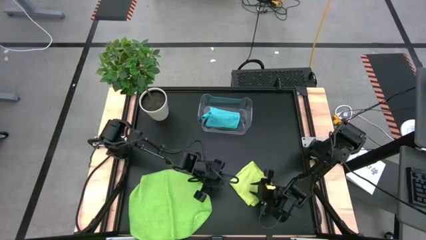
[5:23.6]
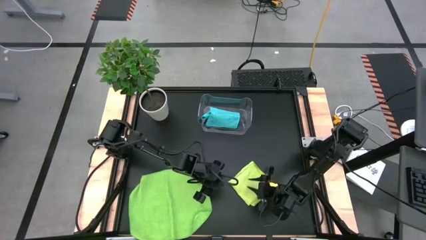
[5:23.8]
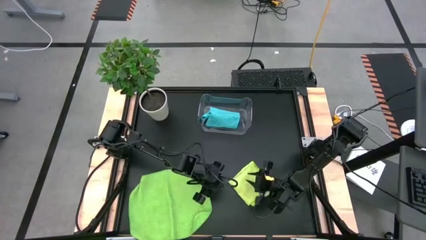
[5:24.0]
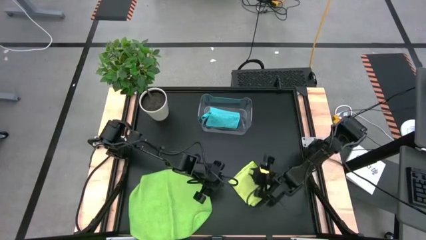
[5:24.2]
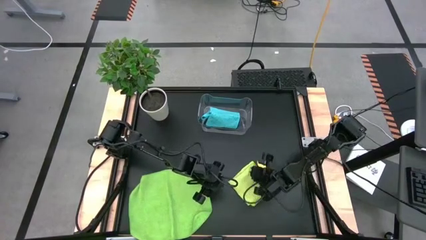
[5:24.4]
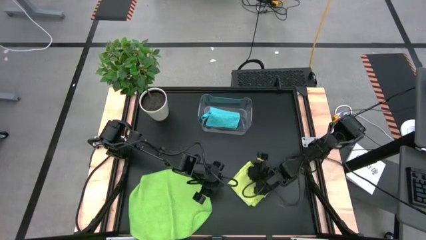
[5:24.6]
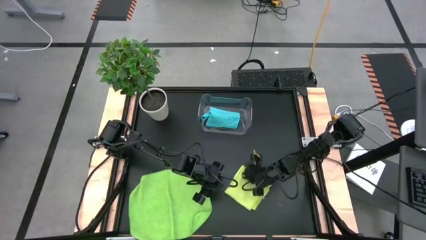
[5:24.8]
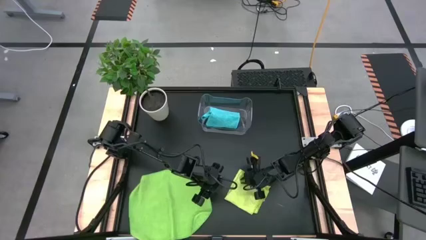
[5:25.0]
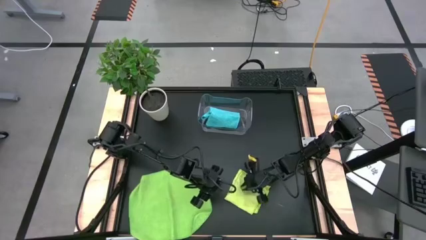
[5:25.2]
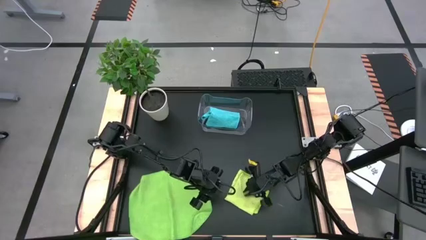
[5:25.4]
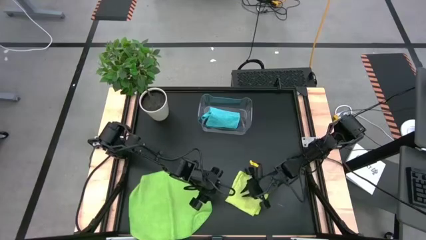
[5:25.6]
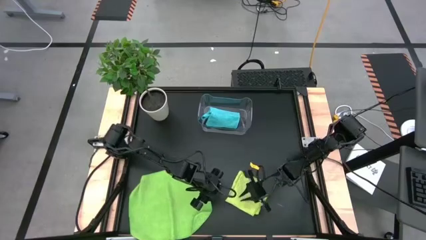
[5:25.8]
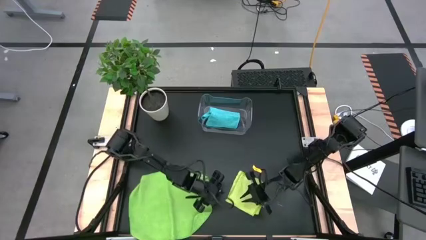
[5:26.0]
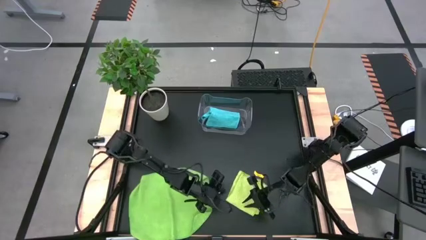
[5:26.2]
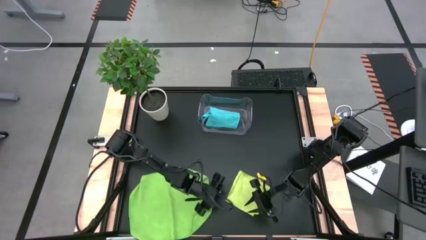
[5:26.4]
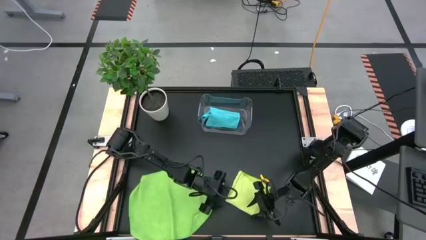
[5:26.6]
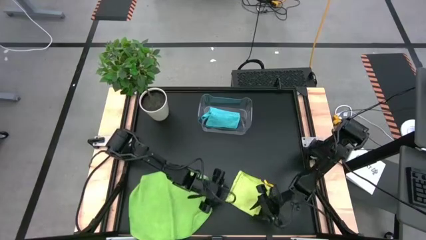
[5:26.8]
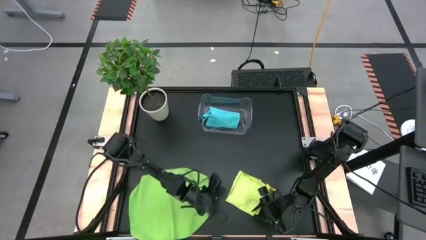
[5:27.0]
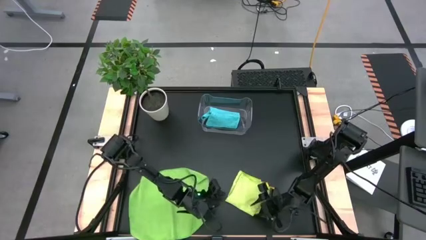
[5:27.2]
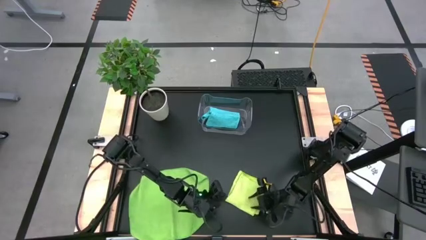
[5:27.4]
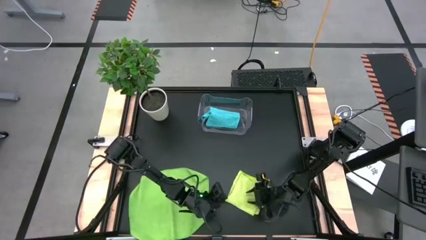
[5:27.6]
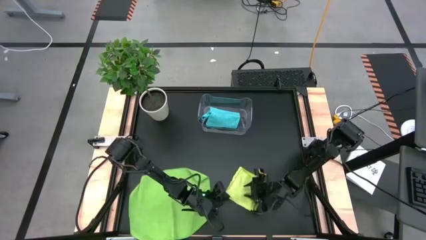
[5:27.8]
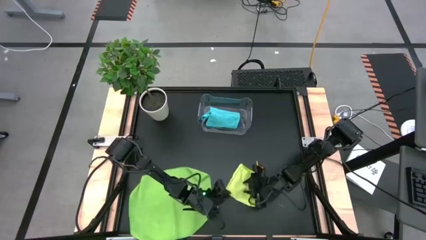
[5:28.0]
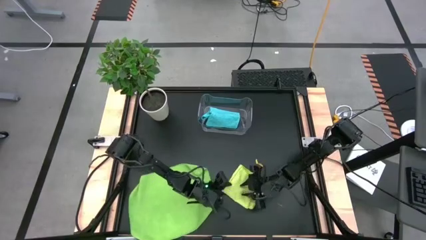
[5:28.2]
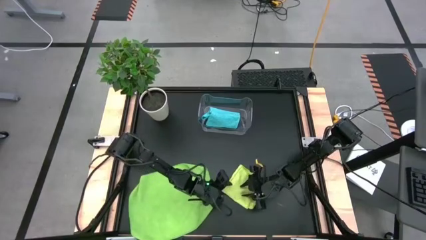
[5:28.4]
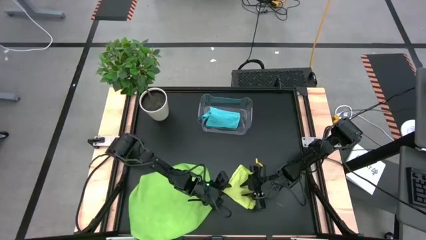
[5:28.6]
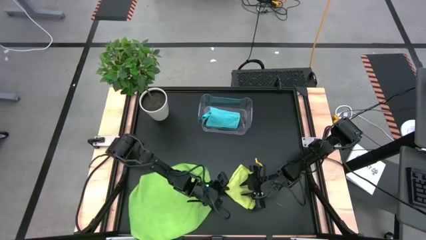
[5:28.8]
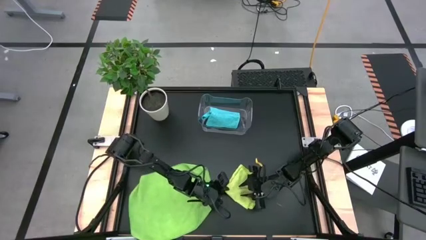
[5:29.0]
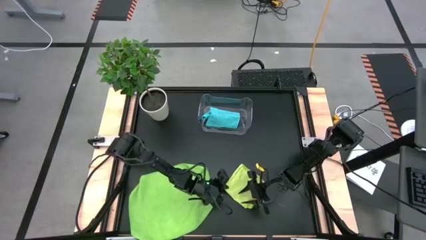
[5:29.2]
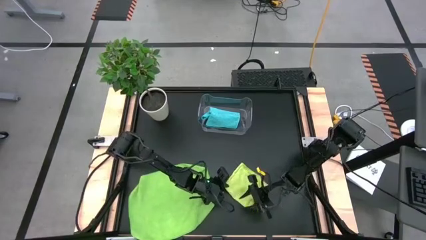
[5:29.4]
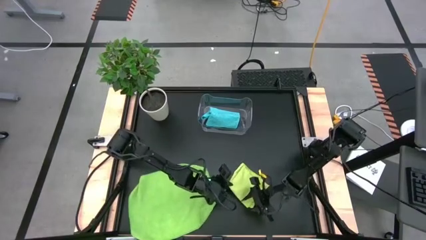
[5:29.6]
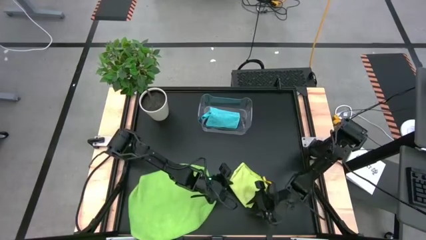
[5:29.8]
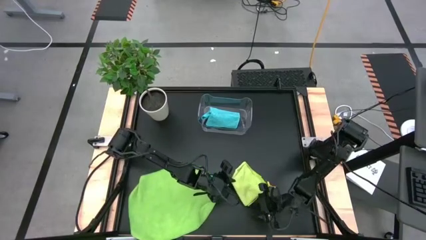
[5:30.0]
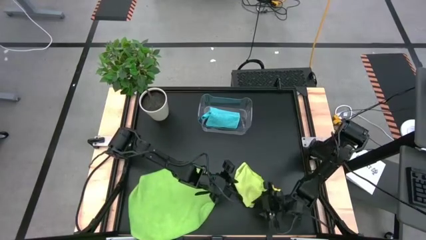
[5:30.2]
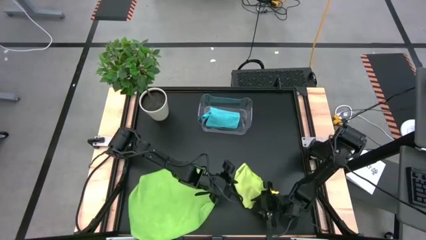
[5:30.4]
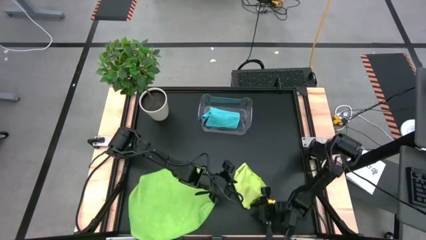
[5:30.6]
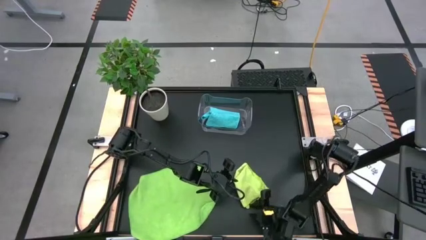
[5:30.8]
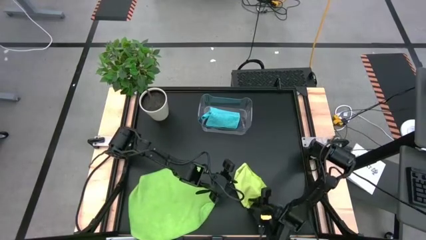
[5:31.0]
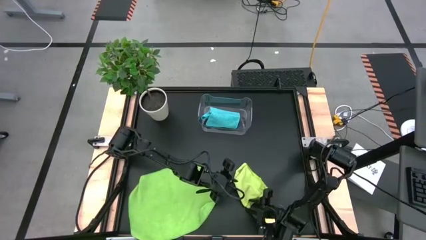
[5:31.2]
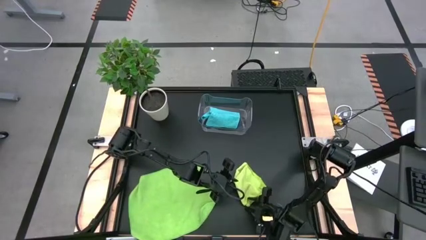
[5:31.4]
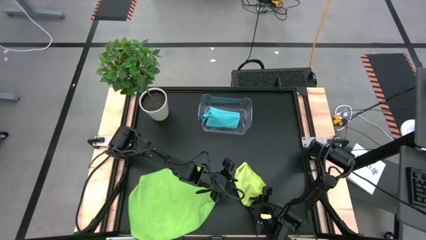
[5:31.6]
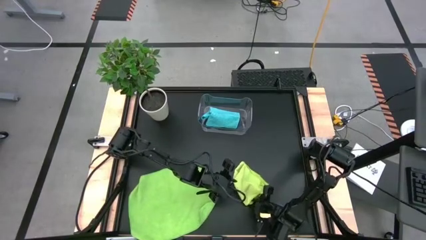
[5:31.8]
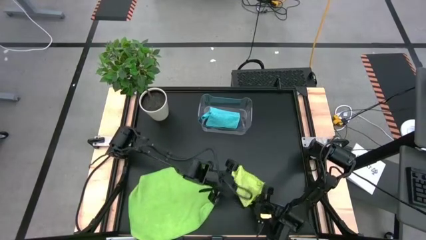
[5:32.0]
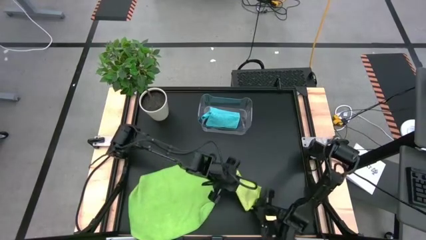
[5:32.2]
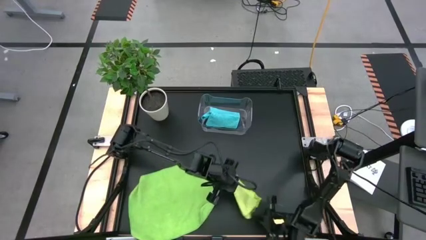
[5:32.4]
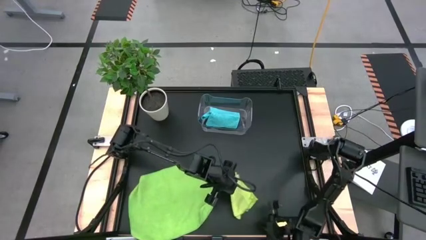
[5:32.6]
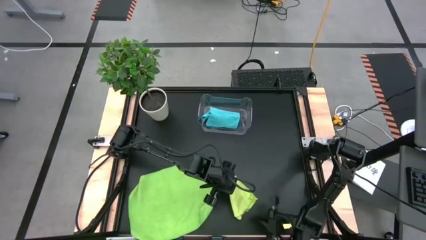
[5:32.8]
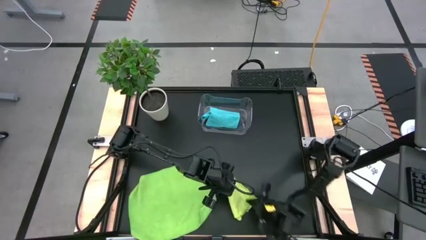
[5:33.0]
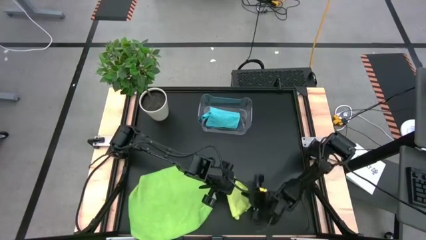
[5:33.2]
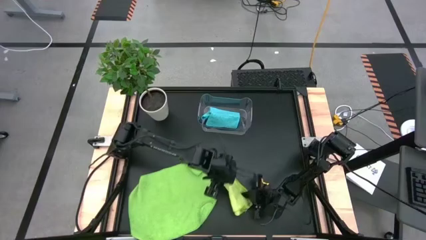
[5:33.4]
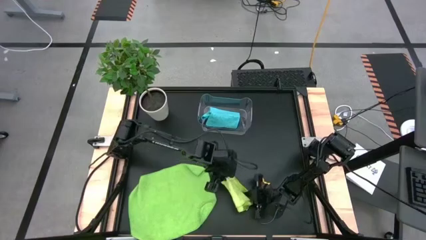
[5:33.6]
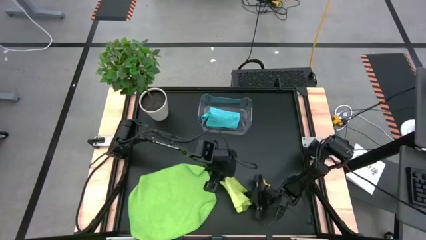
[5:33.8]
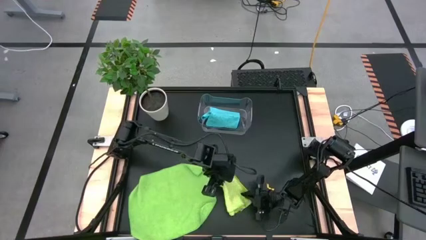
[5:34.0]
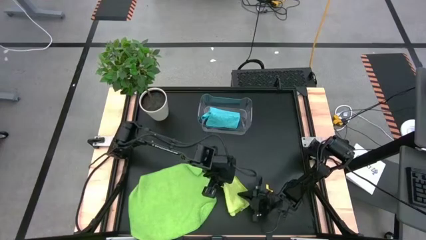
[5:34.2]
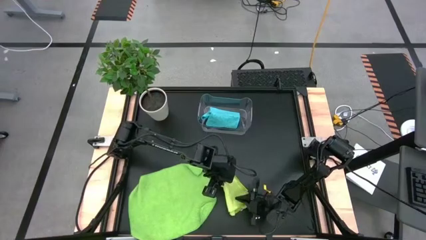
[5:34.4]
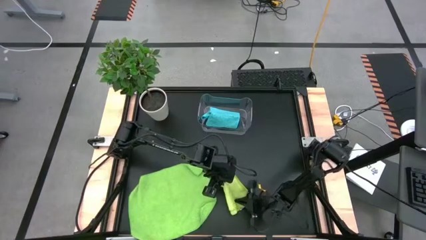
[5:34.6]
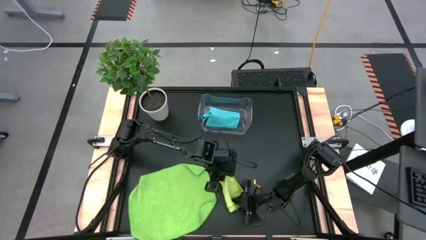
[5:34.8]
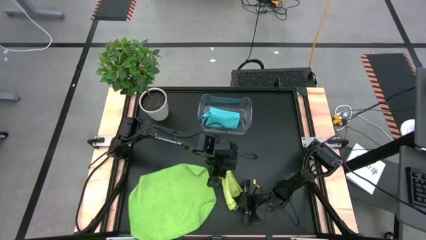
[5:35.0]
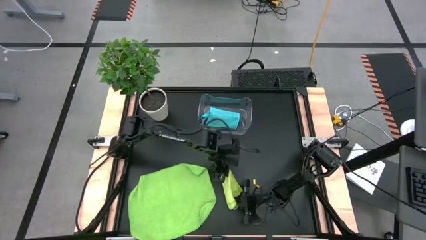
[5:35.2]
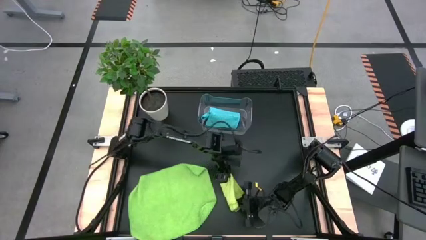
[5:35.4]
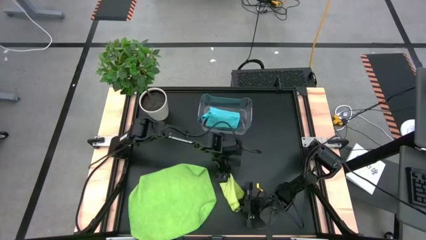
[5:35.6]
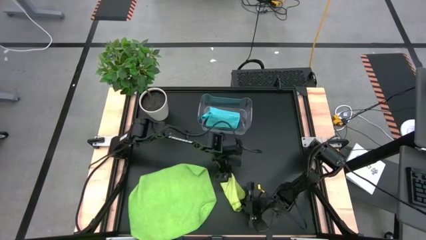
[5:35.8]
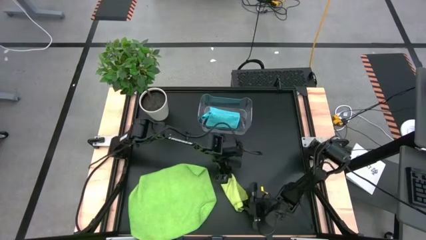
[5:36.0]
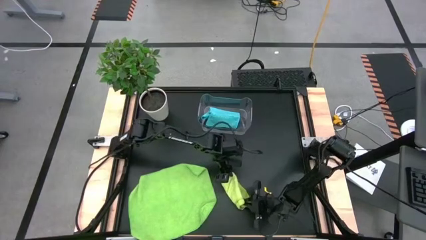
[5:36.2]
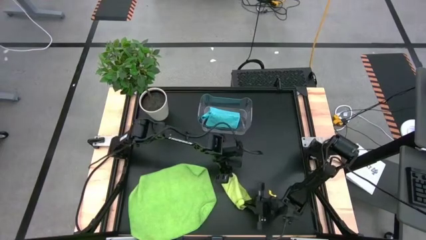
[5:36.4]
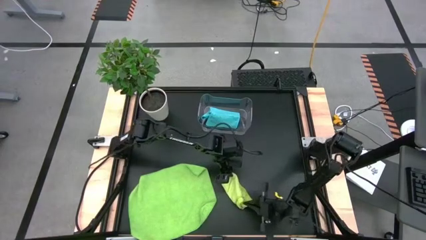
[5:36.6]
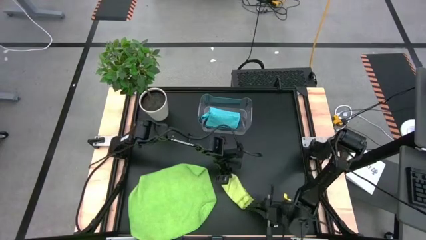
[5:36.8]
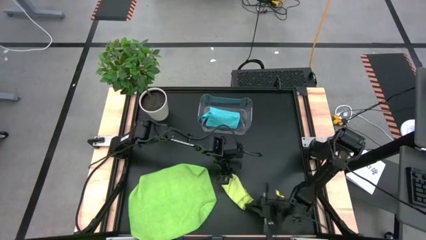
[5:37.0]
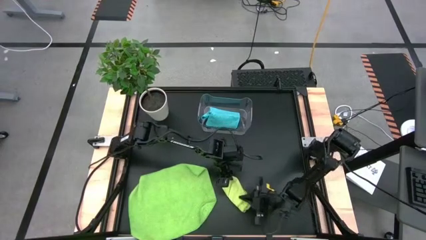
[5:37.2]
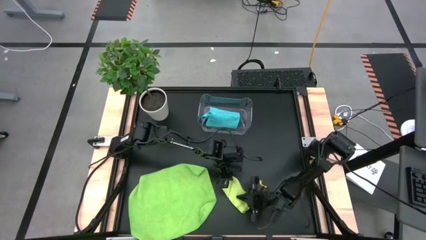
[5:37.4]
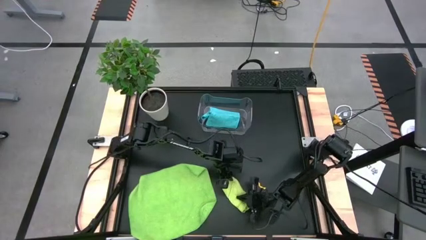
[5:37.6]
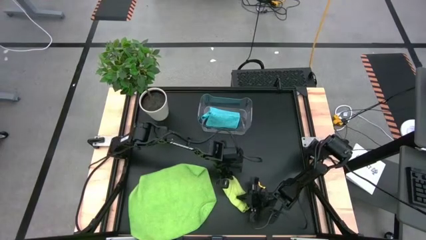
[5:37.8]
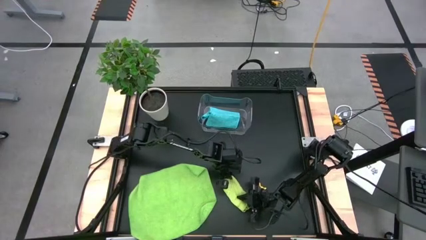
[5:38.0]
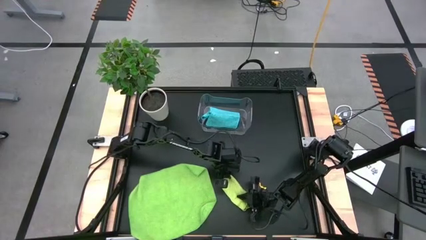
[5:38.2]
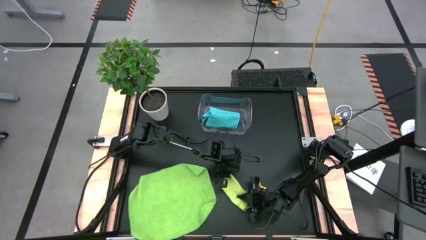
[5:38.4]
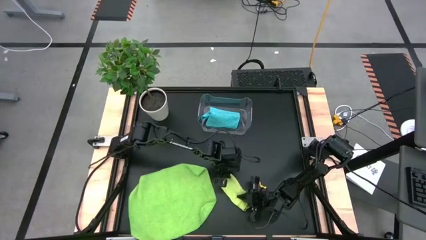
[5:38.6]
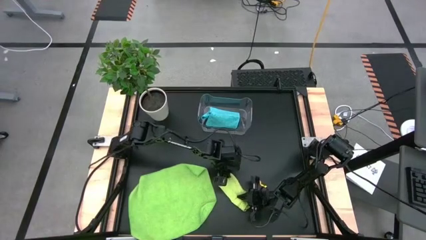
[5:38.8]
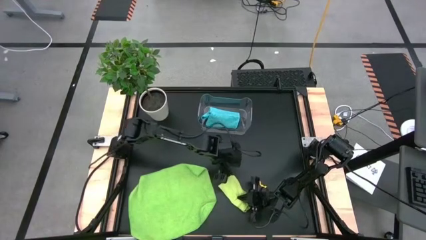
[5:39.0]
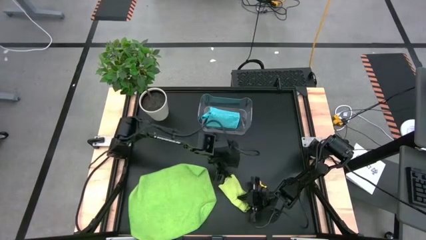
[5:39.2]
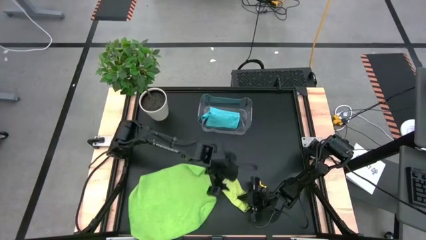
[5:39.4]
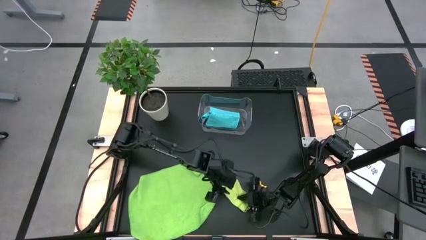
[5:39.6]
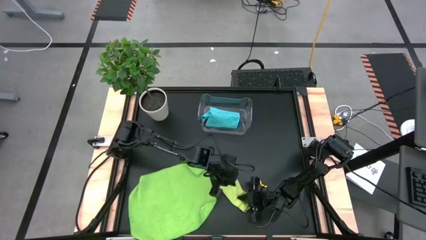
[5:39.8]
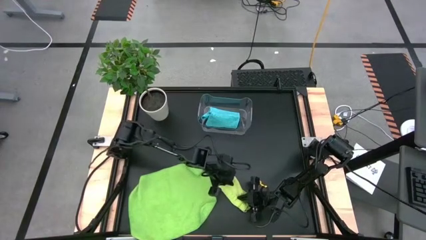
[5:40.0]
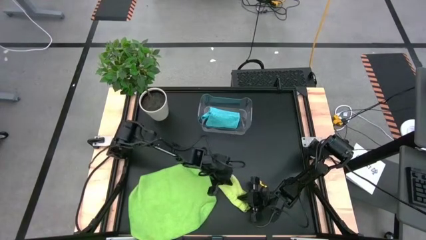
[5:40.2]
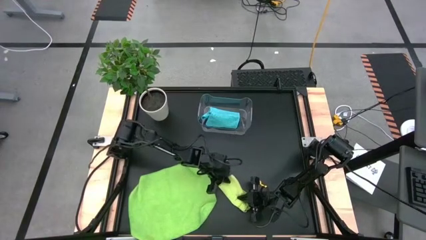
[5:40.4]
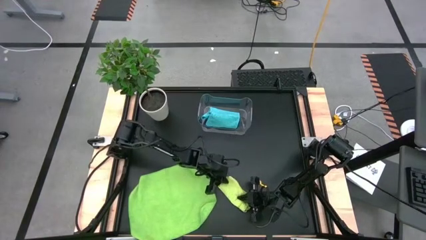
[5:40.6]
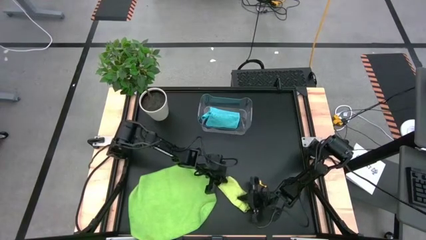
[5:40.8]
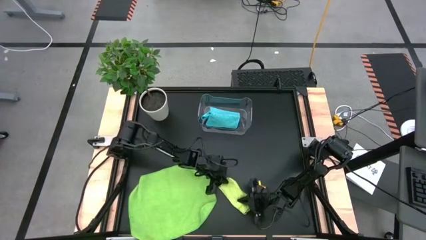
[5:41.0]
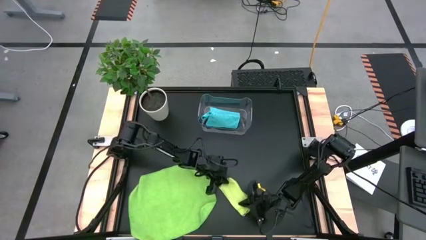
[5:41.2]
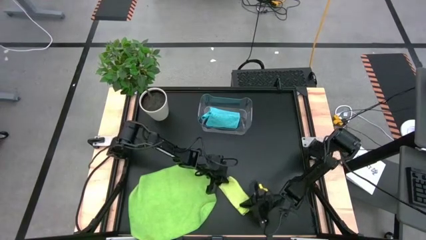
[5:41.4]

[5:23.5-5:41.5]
Task: Fold microfiber towels
Fold the light green towel
